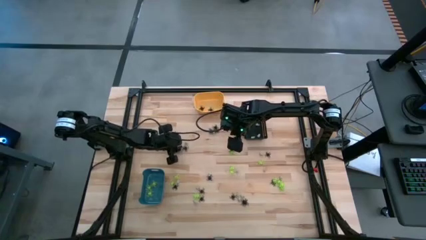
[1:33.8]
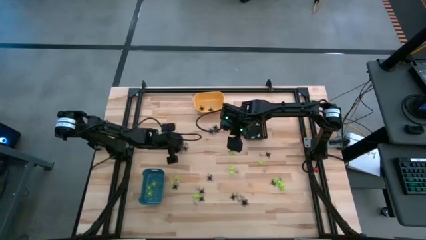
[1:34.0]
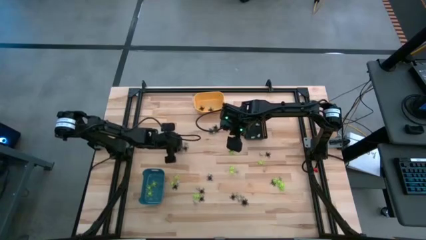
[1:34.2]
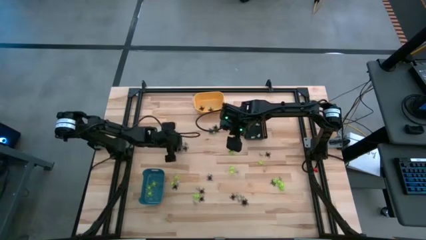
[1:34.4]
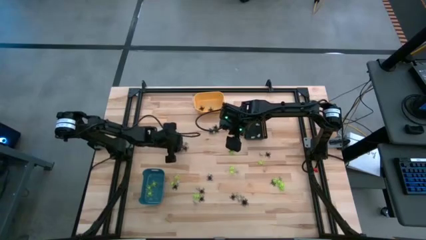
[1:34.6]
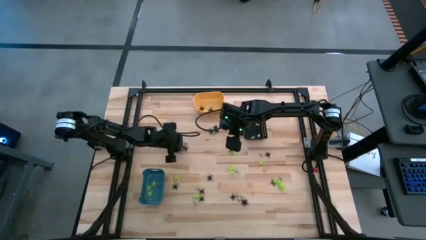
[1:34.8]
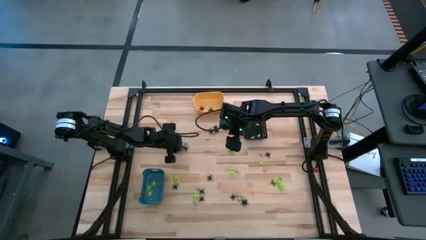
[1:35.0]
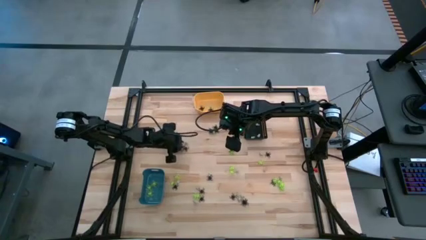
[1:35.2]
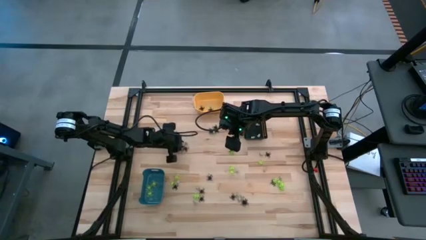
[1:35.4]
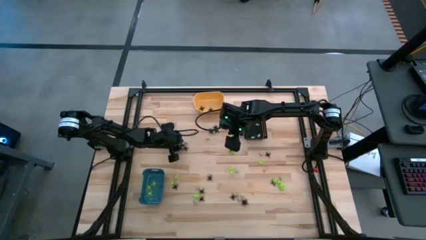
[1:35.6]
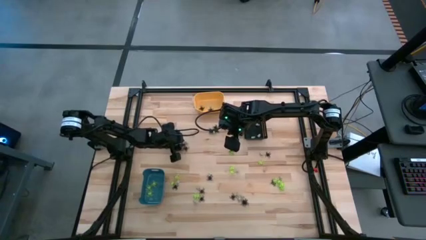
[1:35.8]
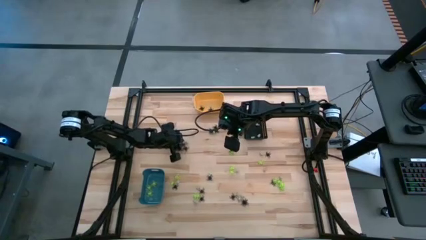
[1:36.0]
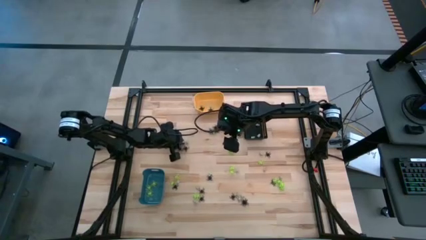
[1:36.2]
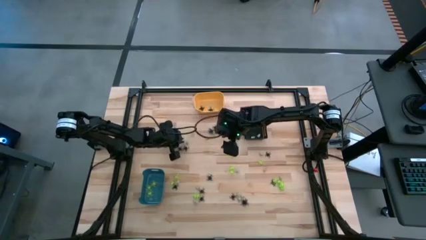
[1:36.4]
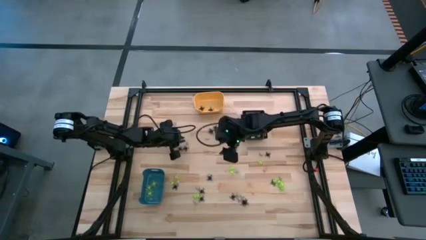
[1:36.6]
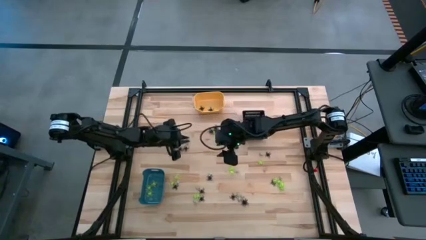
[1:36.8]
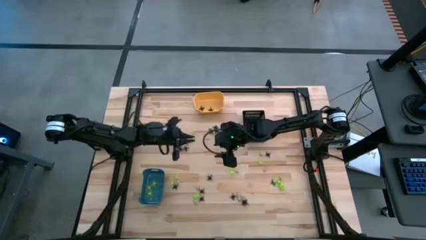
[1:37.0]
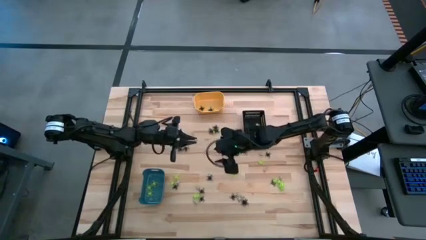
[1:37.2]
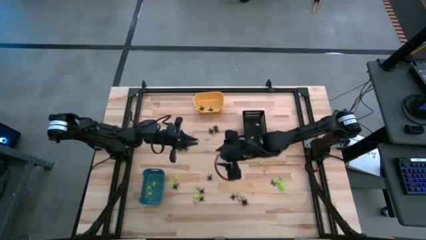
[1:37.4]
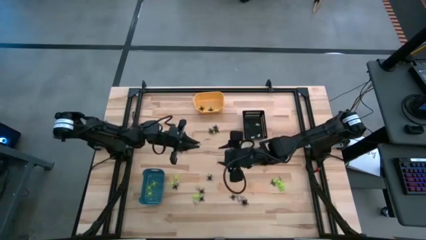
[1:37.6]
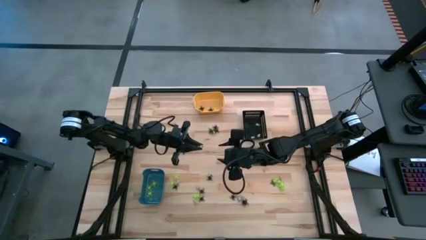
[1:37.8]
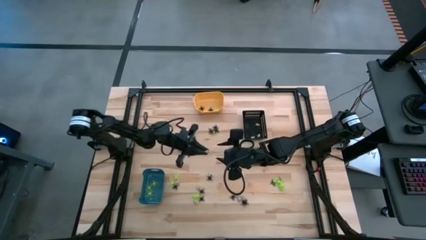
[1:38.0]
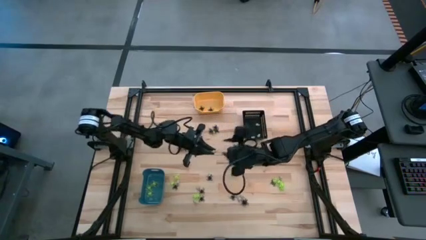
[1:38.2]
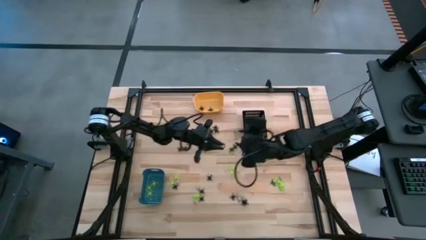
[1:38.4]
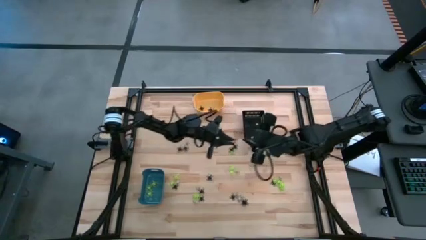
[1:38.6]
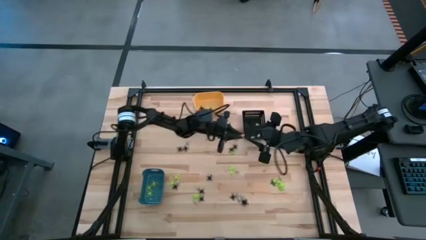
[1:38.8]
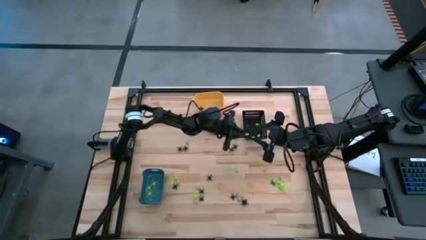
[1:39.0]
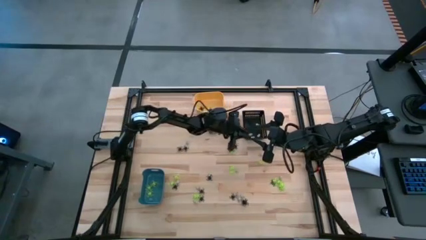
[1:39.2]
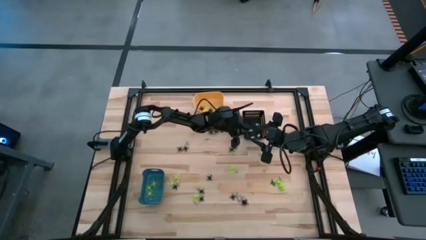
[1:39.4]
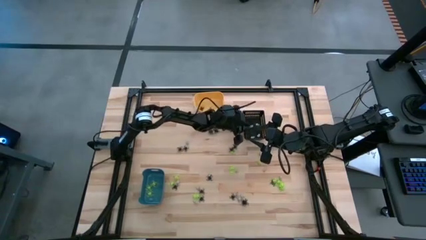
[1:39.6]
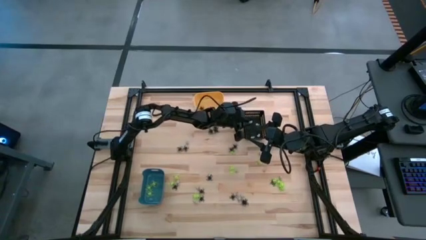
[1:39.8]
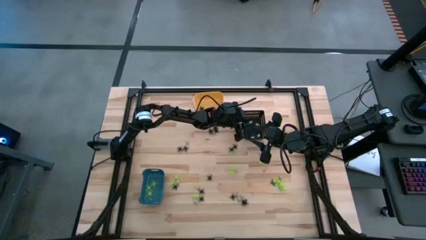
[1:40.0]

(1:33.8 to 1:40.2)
Task: Sort Halloween decoration
Put the white skull toy into the black bin

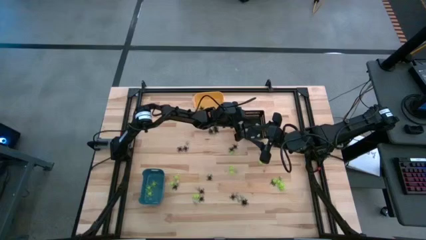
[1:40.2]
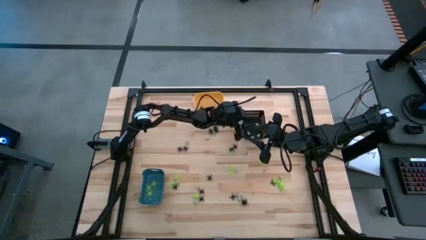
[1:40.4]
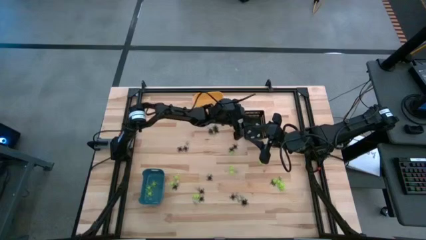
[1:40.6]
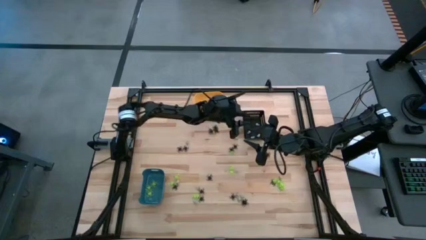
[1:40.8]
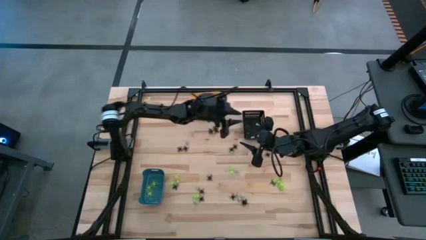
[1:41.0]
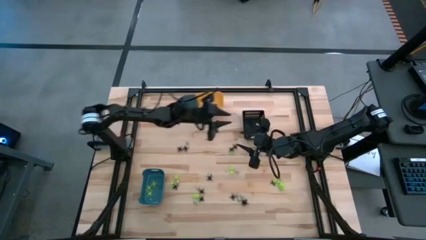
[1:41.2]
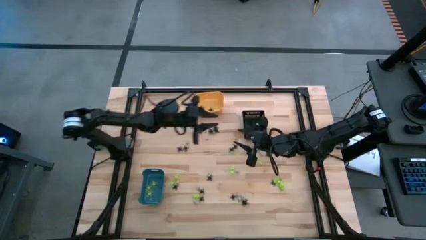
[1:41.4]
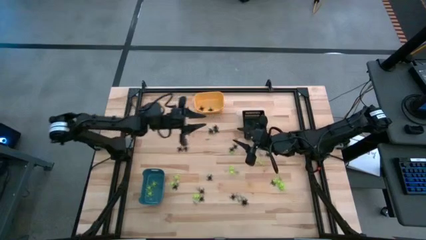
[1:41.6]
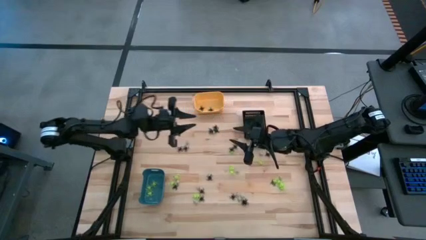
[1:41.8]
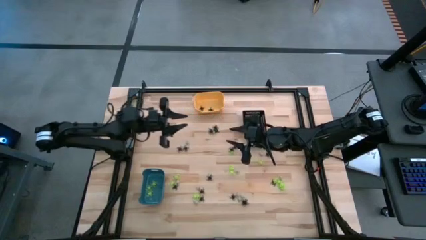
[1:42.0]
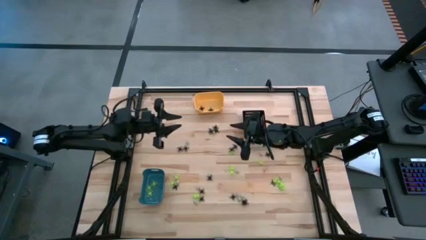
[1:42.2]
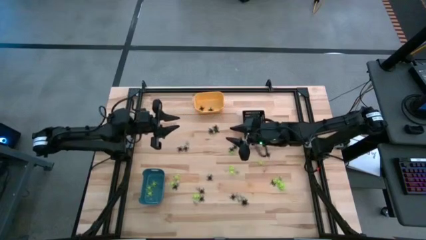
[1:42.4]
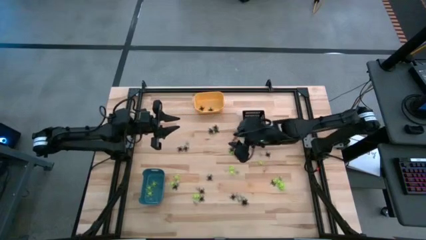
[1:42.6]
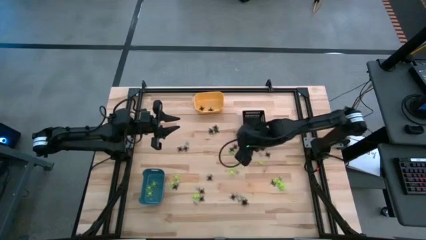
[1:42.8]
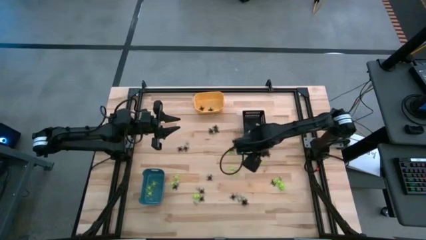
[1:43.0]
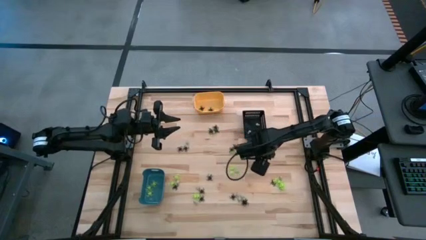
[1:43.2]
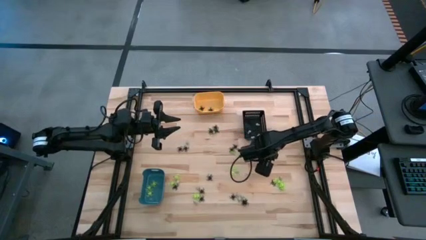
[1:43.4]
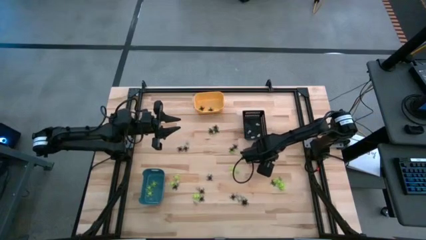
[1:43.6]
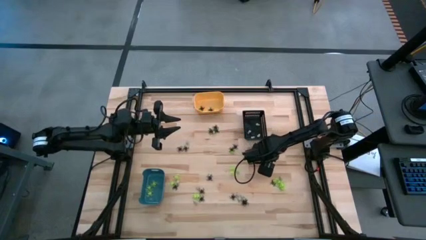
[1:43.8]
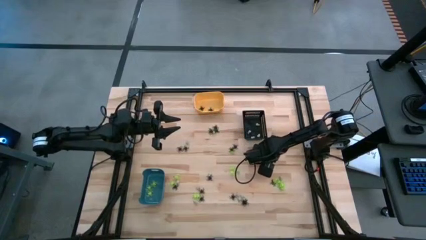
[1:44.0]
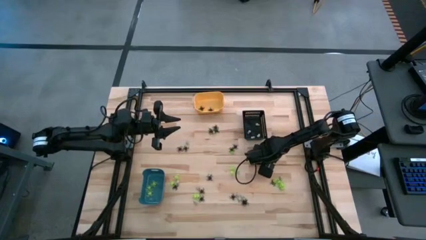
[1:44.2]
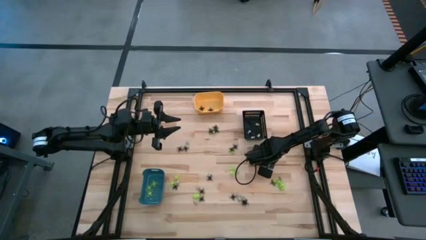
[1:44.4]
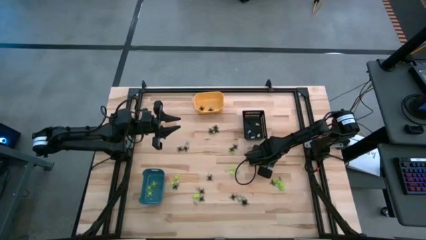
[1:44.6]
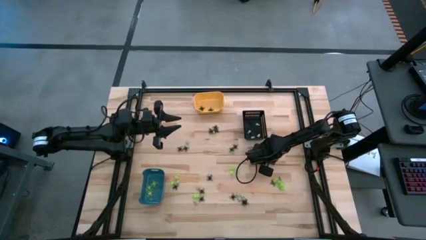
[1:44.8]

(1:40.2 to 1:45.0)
Put the black spider toy into the yellow bin

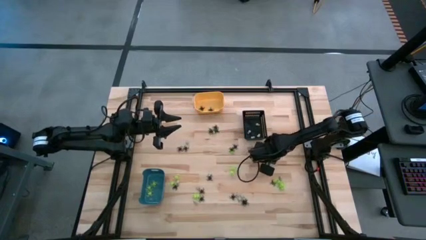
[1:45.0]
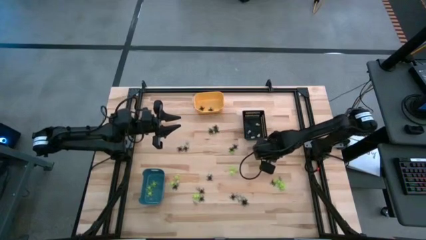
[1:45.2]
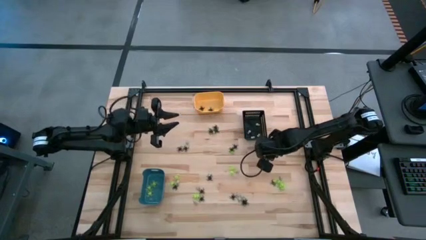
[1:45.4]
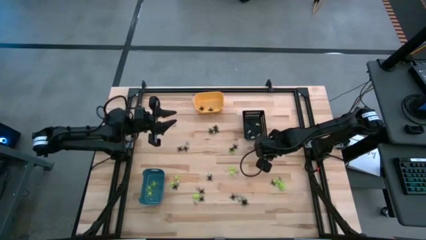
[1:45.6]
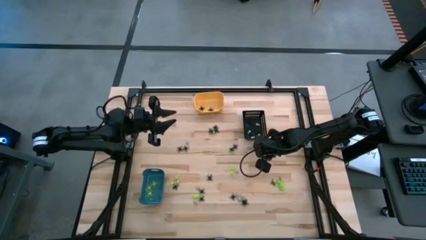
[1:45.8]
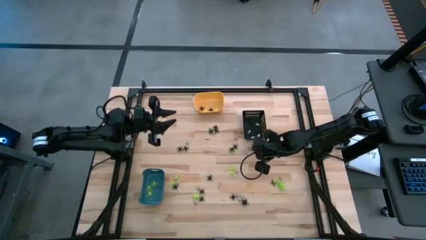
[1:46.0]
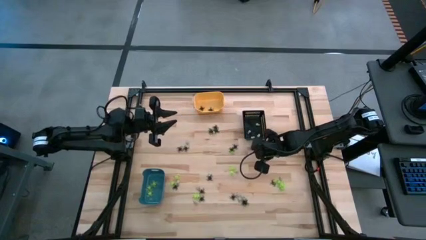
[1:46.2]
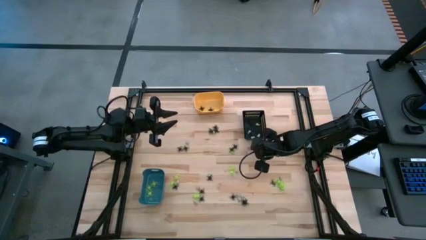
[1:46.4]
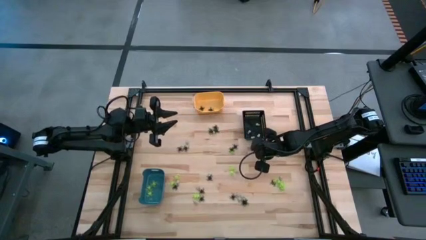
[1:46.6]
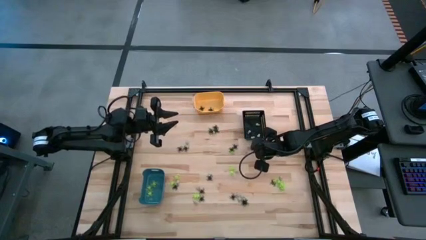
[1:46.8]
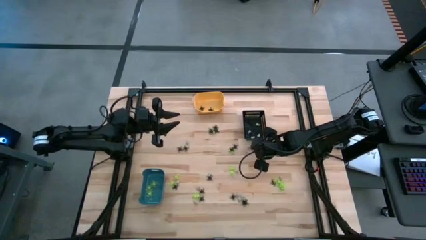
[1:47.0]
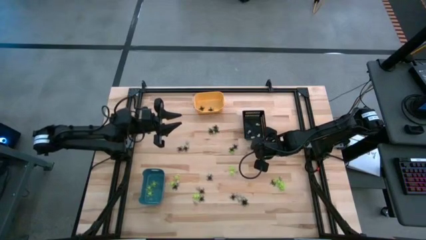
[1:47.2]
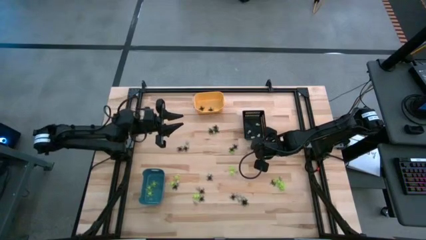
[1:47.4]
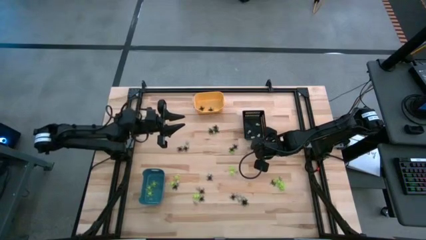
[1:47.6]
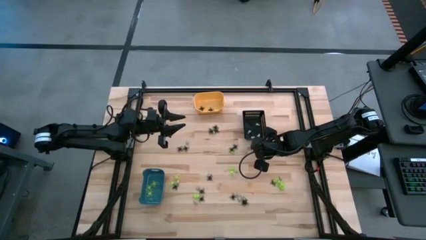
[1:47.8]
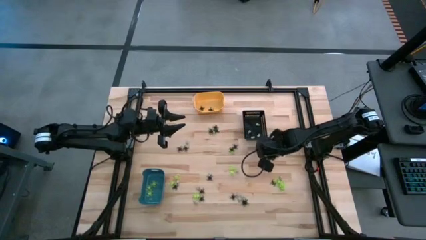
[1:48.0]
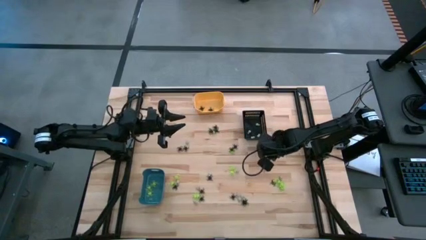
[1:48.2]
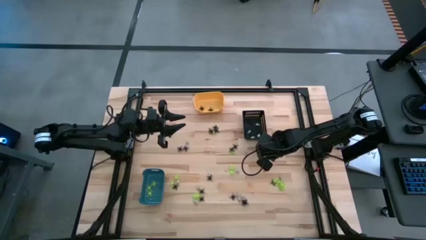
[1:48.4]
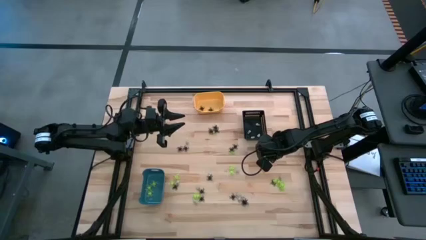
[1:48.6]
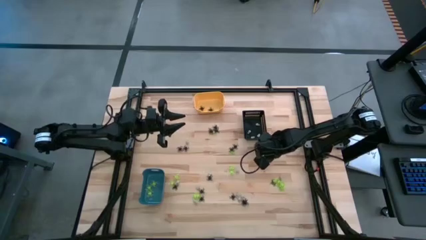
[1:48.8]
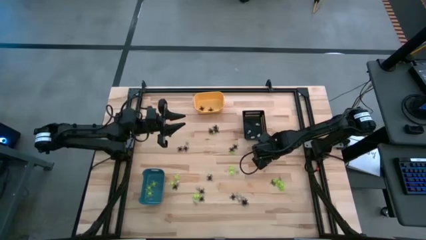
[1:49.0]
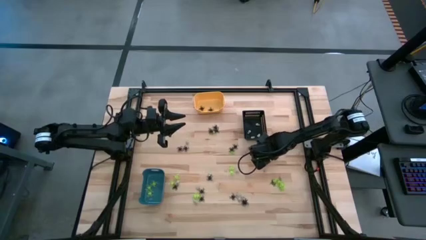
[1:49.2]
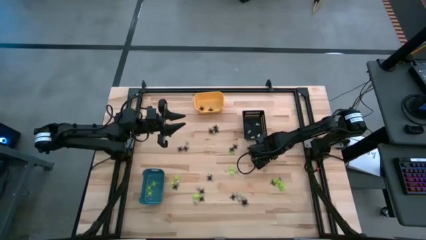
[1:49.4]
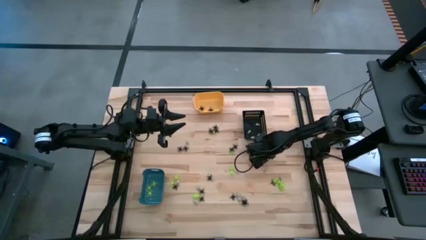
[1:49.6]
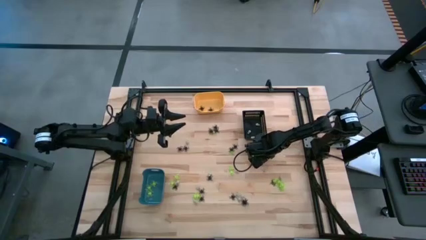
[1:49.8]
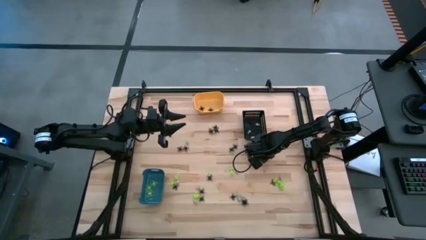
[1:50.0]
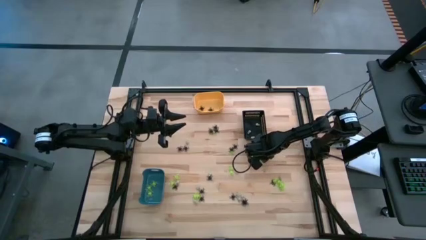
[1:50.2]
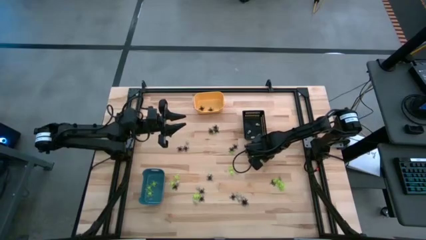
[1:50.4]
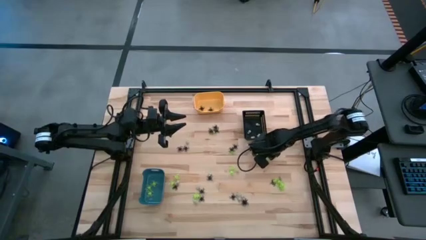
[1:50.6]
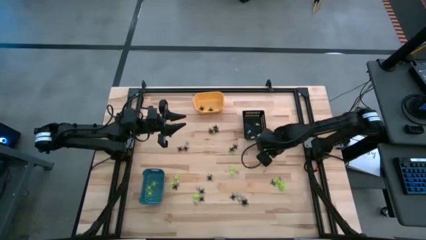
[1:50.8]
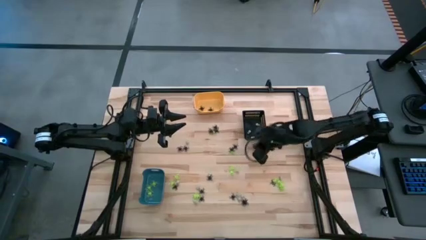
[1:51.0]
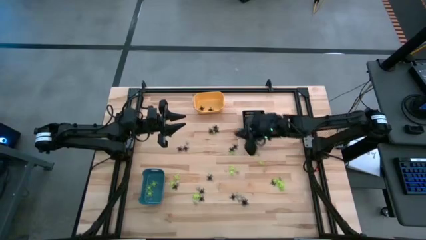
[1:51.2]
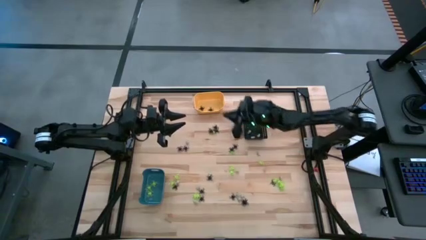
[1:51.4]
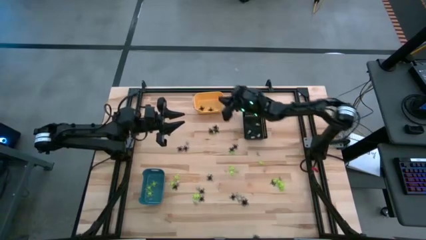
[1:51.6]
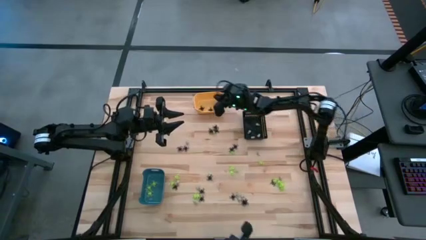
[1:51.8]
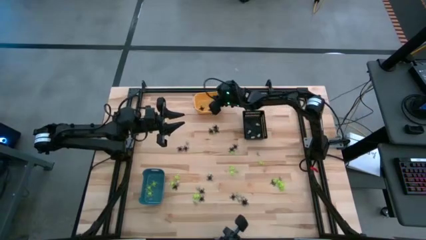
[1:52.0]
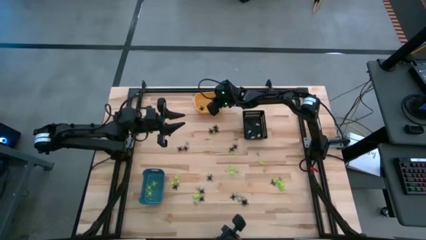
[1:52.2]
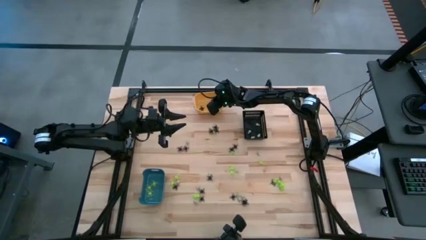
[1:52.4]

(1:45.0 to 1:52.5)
Put the black spider toy into the yellow bin
